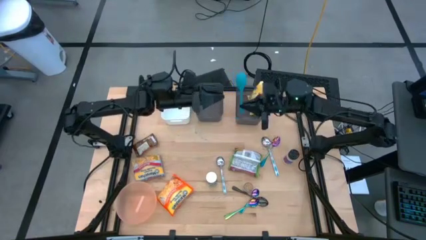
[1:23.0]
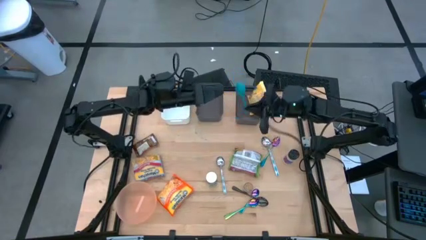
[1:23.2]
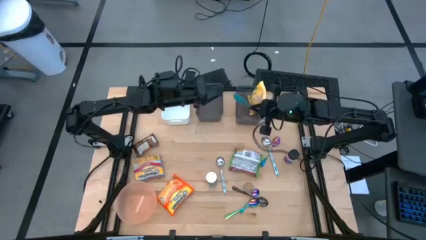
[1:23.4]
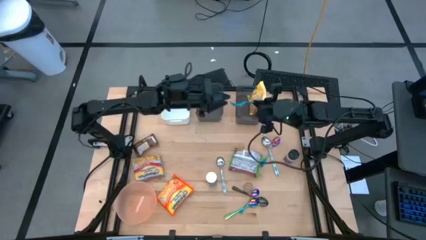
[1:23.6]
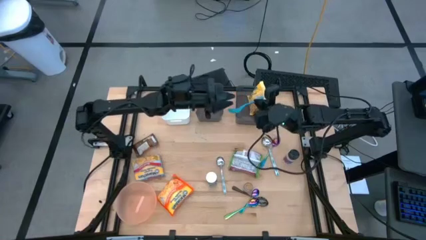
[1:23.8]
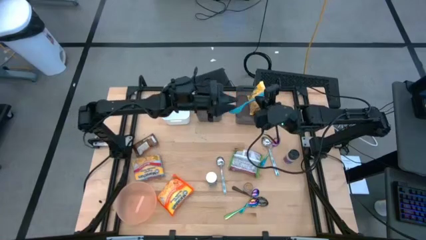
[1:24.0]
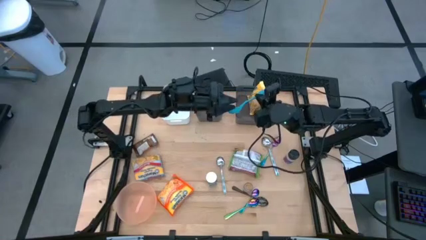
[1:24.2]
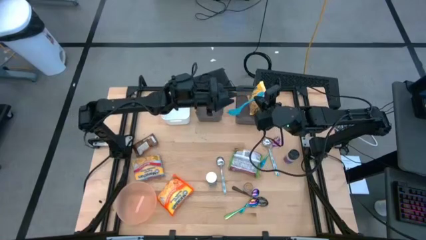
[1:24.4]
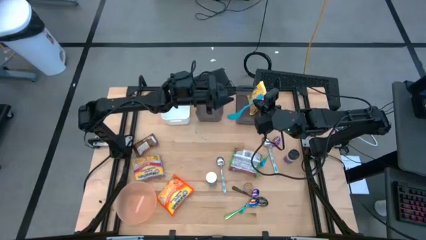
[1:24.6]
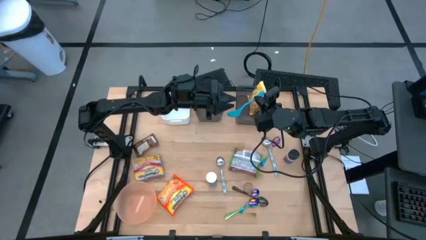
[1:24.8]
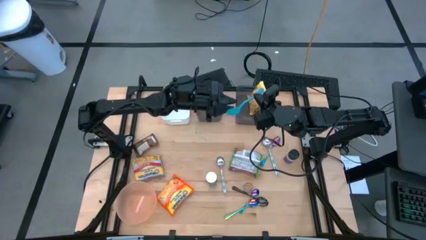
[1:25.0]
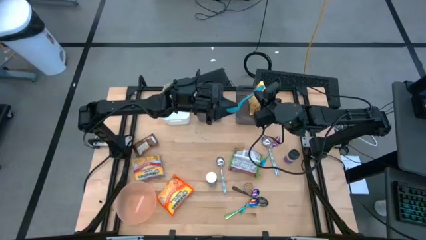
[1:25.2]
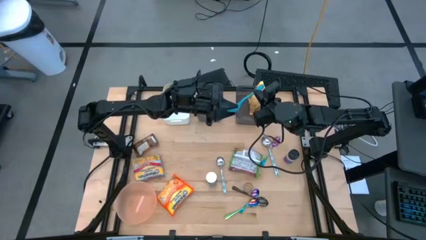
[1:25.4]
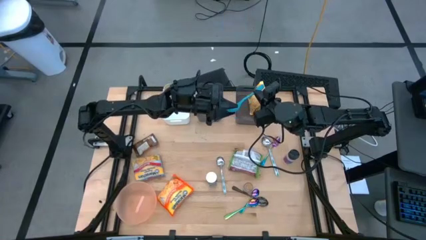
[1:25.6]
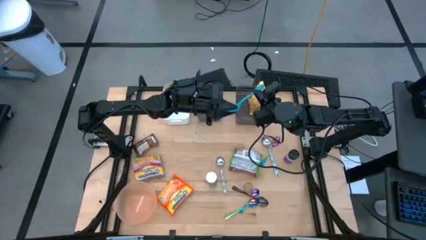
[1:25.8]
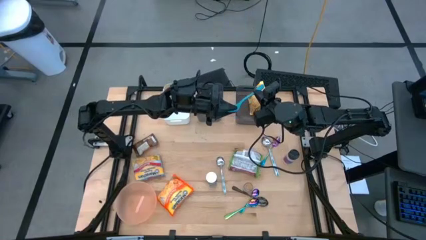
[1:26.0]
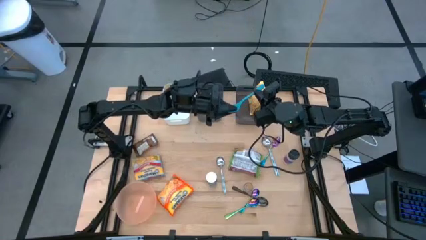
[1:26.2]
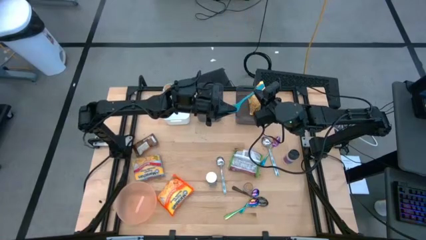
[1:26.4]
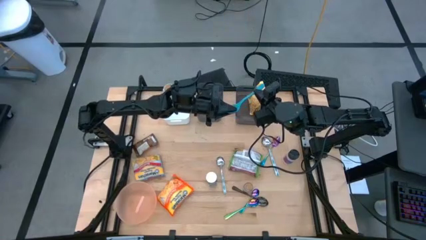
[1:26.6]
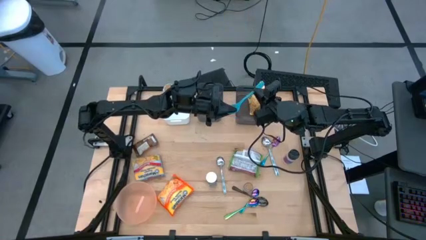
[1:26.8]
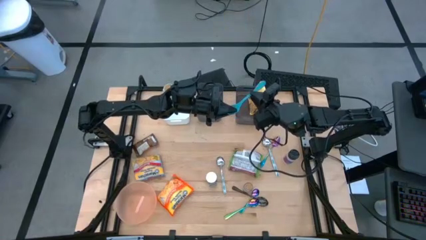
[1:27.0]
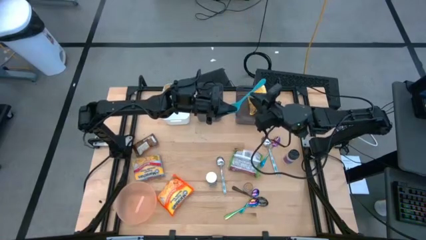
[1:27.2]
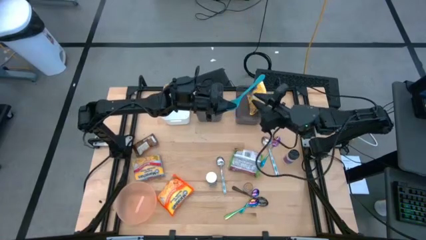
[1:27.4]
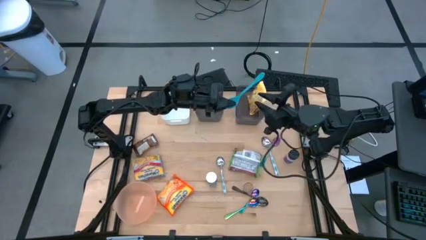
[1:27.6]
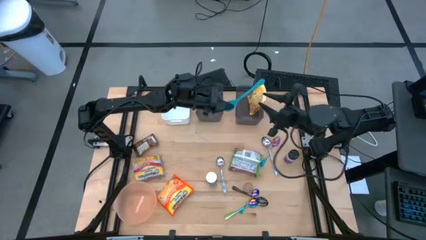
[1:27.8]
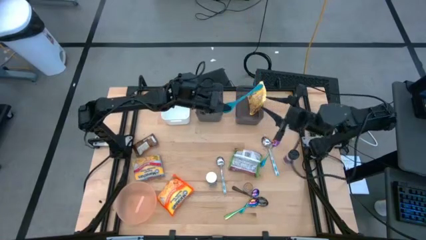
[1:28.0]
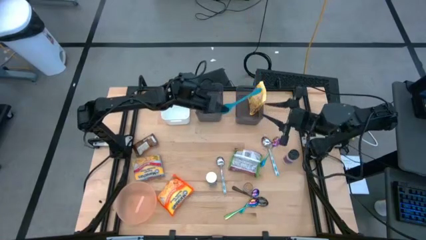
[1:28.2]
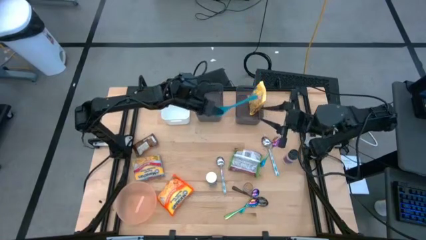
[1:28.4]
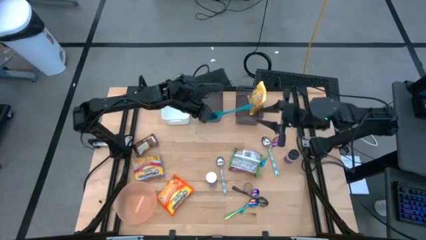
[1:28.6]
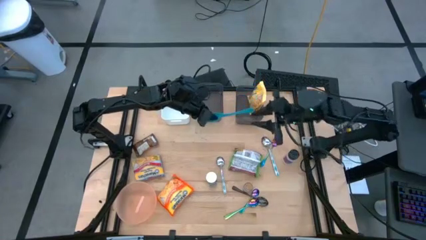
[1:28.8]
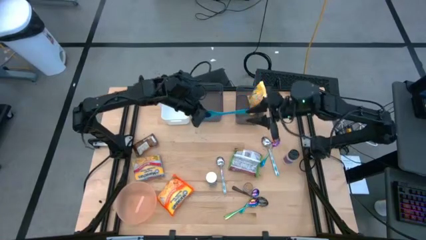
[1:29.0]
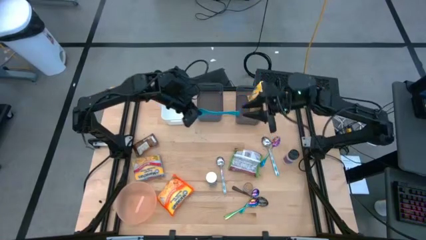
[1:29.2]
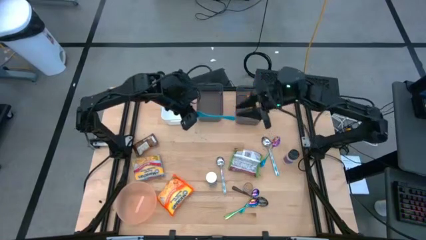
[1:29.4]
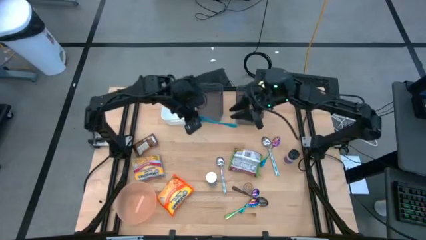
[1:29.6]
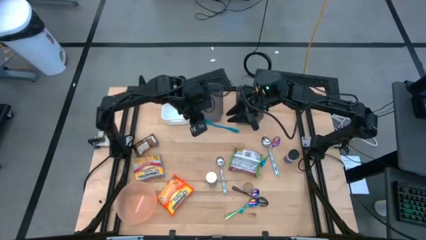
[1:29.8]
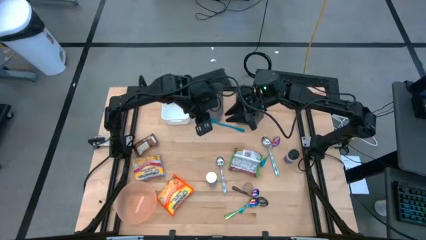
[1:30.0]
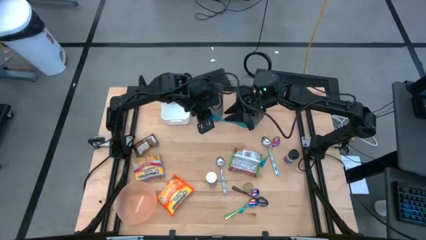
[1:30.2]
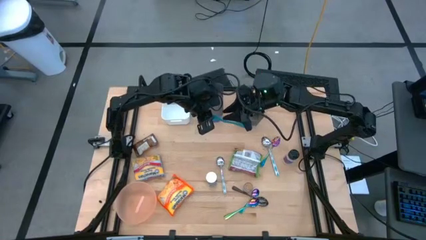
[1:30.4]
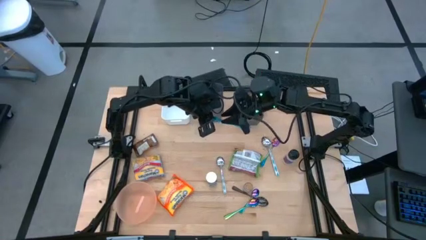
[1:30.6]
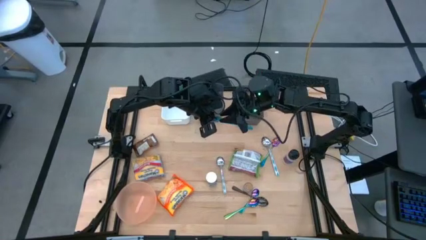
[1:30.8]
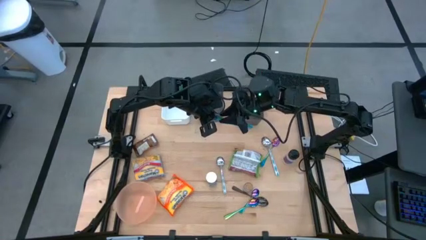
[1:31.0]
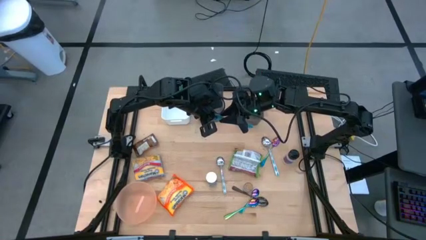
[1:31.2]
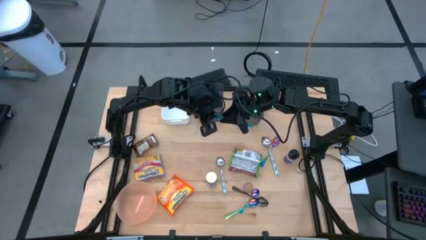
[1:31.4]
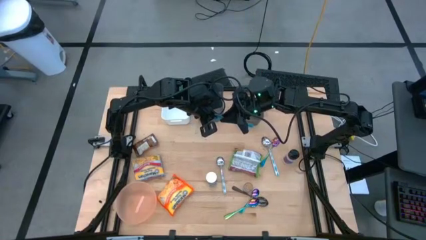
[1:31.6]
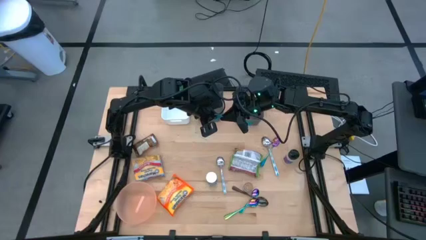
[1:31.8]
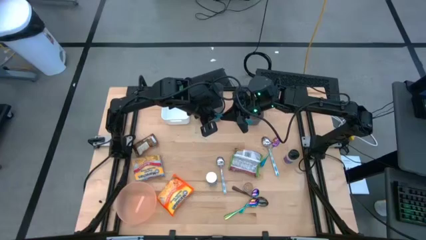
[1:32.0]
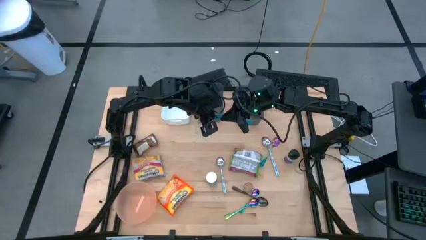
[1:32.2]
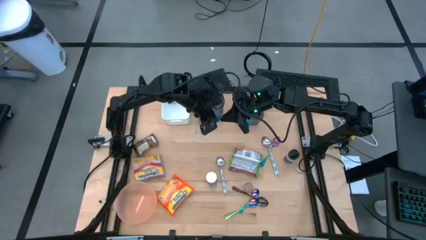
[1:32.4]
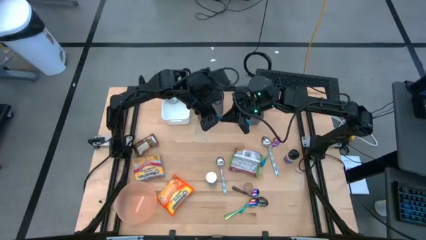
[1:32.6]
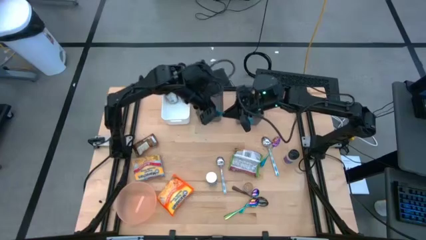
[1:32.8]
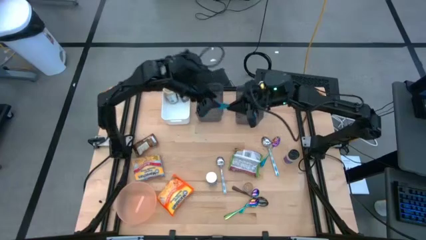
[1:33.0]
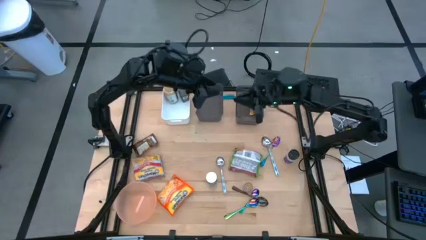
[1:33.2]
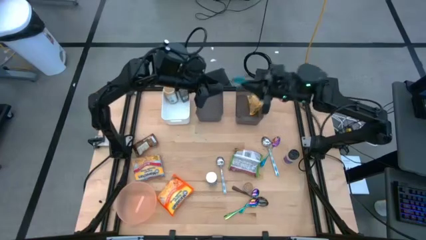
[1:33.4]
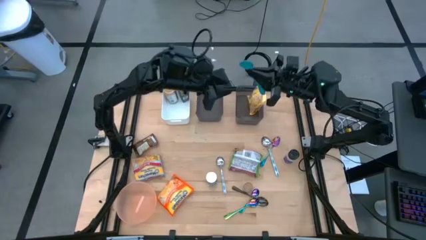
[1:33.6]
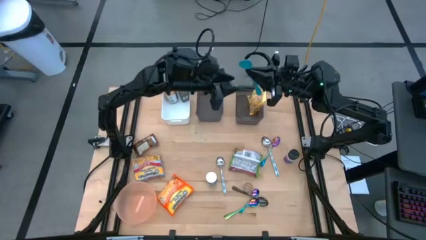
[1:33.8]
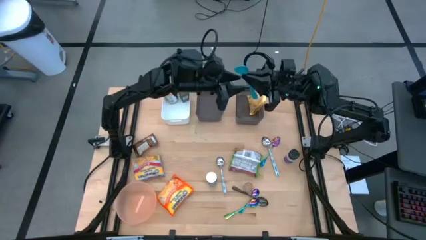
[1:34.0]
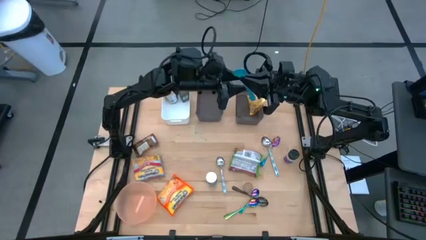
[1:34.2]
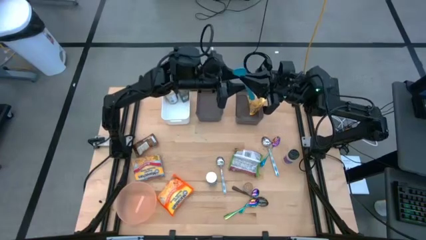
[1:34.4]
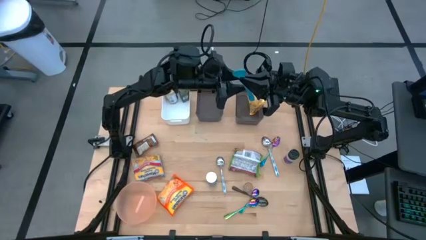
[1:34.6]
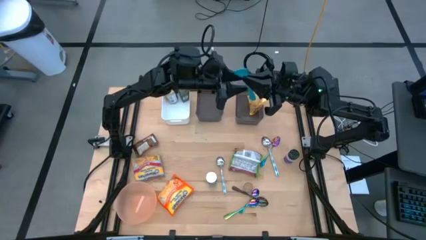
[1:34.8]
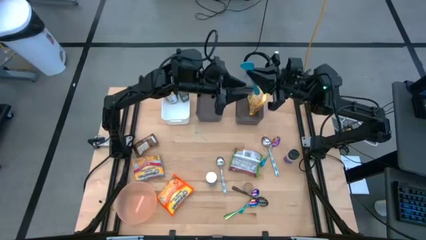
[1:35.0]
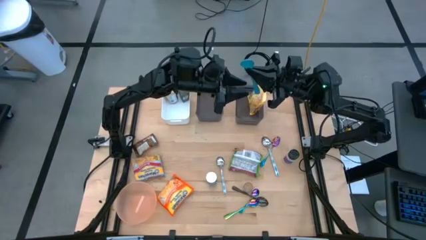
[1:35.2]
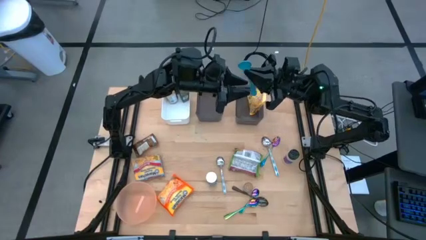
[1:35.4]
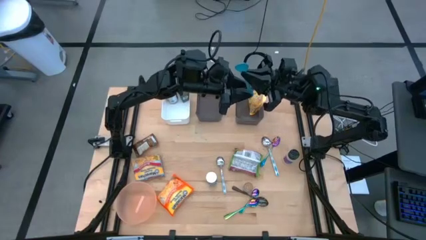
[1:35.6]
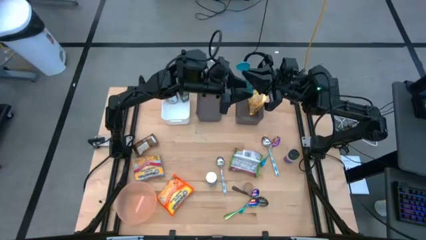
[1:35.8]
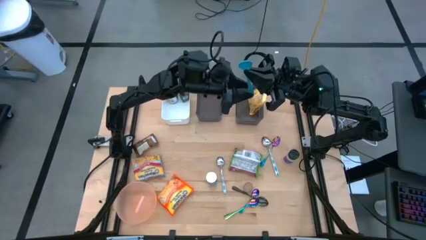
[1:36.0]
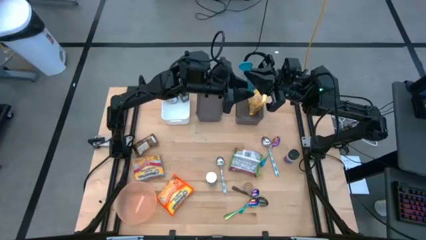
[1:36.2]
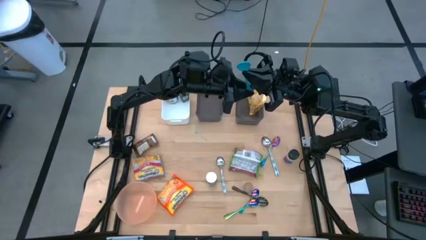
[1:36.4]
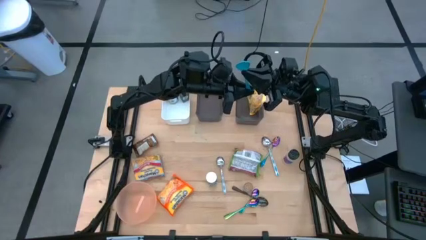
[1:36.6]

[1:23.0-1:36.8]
Task: Pick & Place Food Item
Put the blue baby spoon into the left black bin
